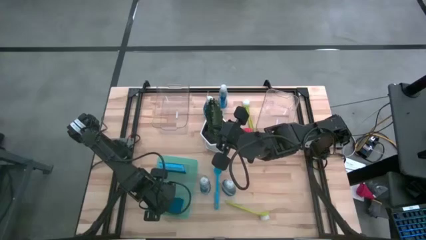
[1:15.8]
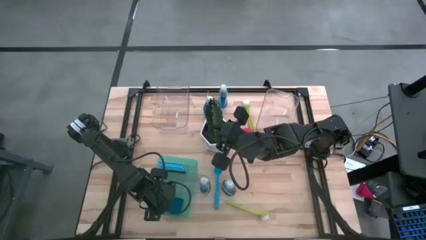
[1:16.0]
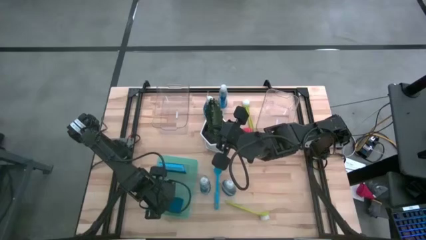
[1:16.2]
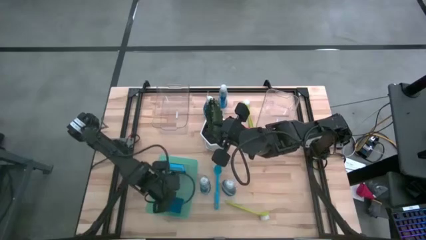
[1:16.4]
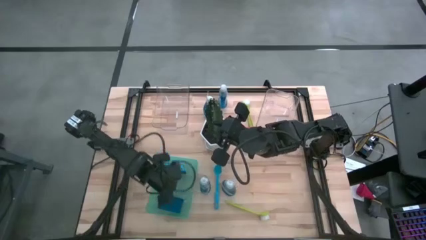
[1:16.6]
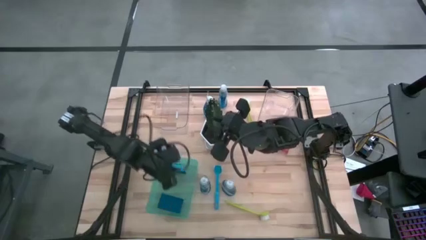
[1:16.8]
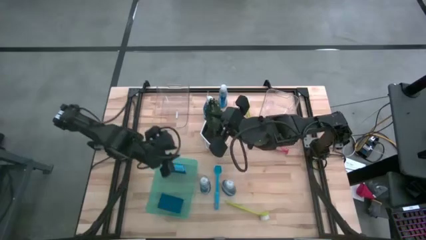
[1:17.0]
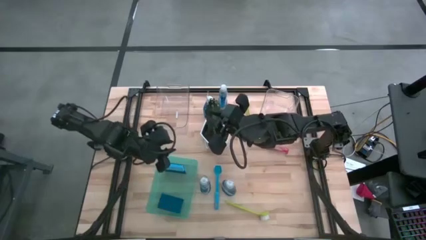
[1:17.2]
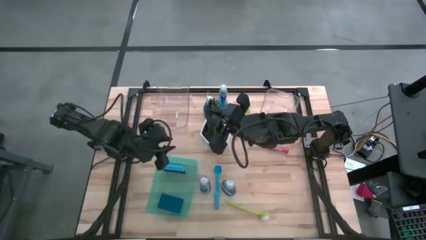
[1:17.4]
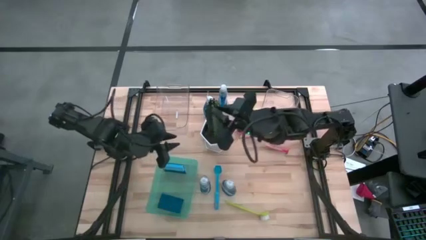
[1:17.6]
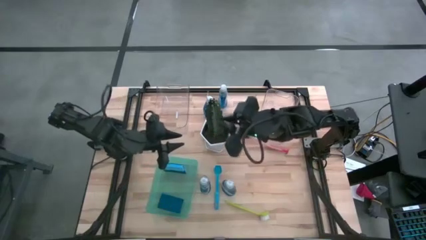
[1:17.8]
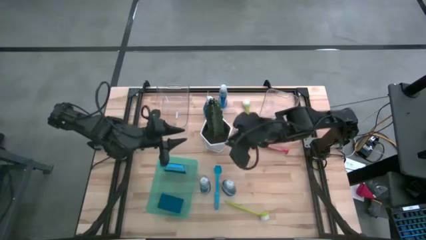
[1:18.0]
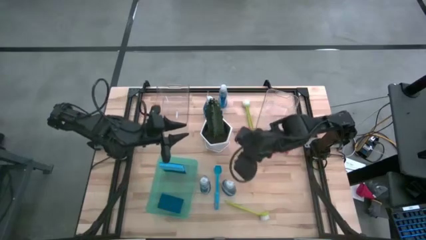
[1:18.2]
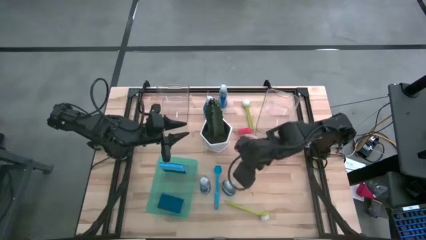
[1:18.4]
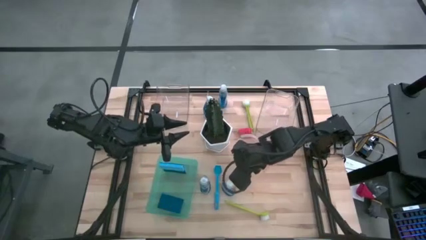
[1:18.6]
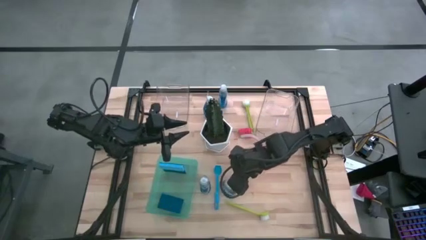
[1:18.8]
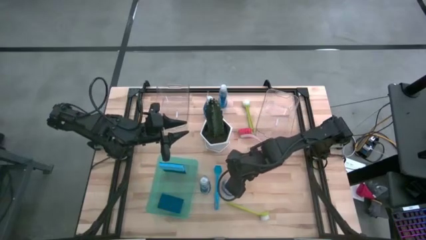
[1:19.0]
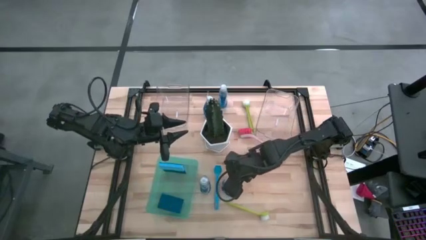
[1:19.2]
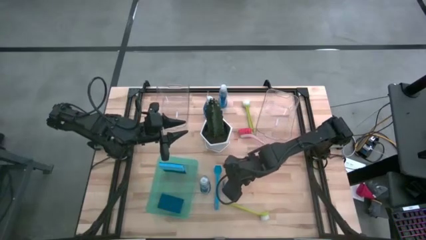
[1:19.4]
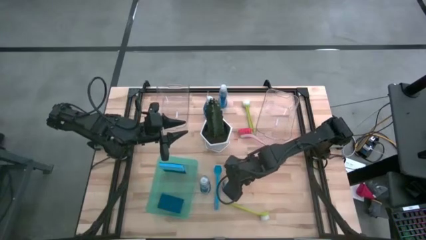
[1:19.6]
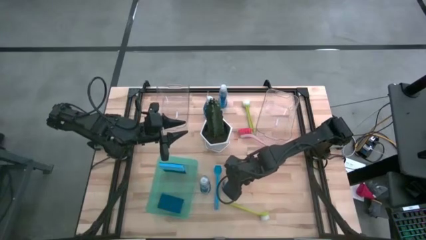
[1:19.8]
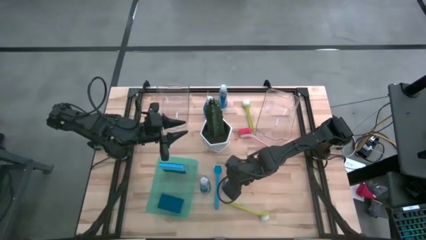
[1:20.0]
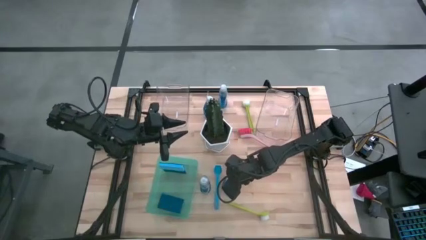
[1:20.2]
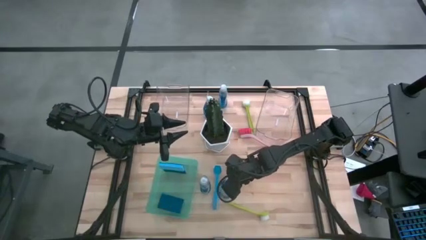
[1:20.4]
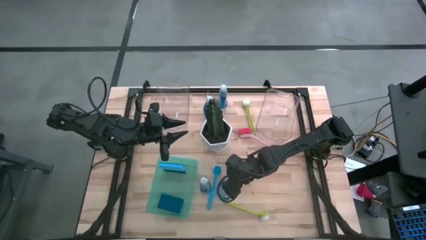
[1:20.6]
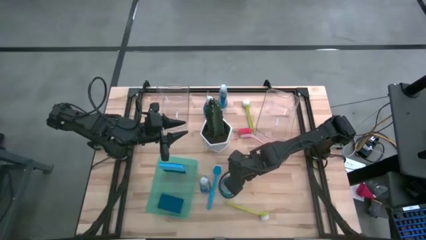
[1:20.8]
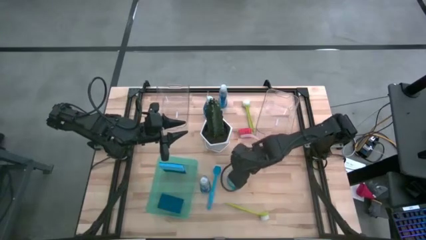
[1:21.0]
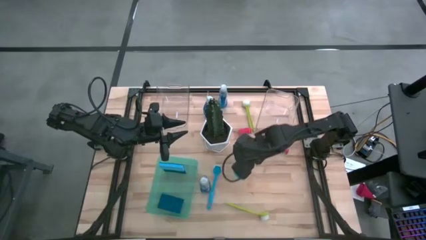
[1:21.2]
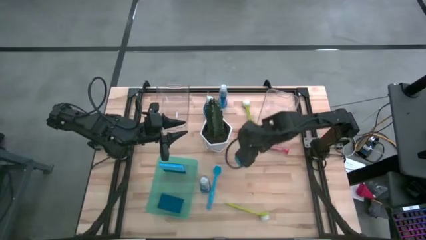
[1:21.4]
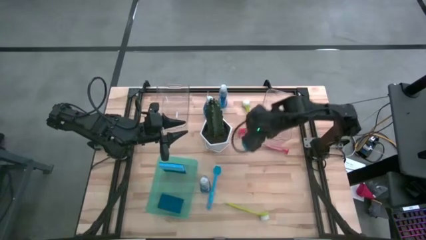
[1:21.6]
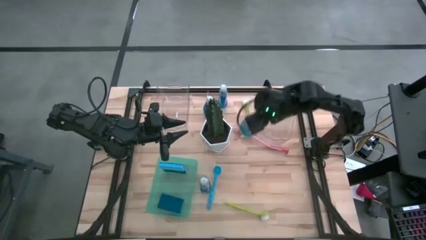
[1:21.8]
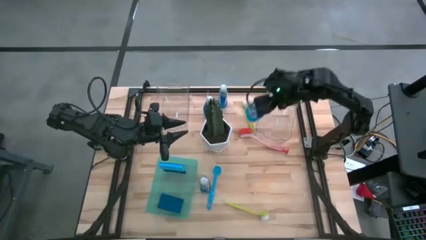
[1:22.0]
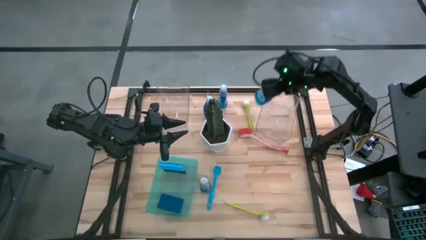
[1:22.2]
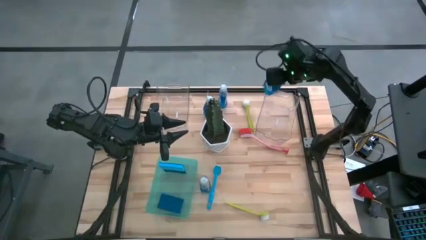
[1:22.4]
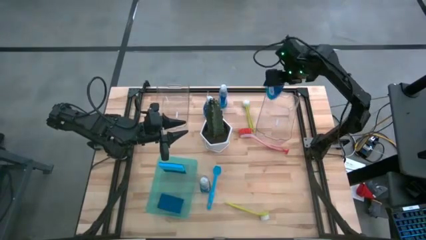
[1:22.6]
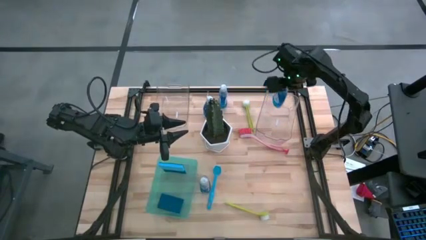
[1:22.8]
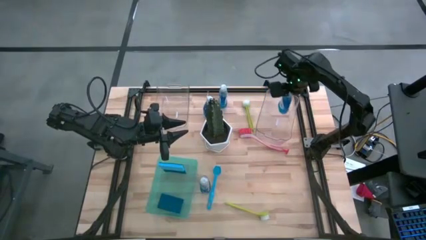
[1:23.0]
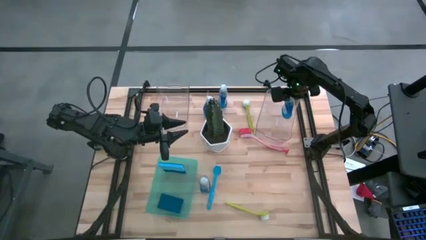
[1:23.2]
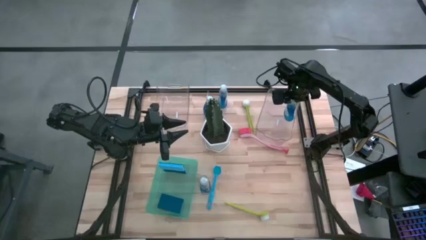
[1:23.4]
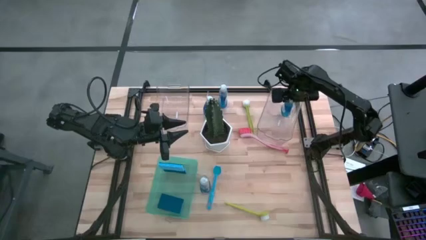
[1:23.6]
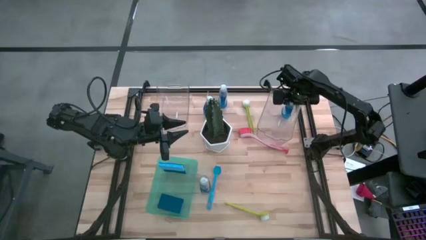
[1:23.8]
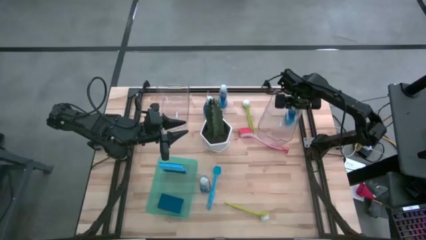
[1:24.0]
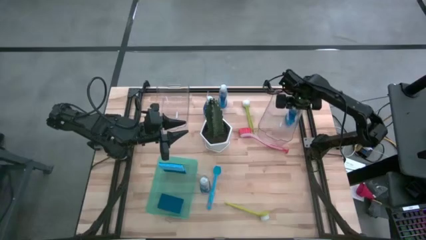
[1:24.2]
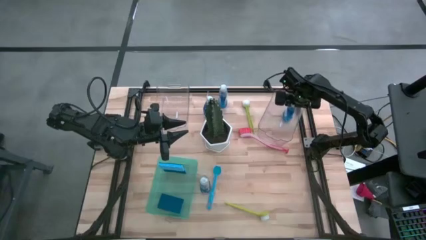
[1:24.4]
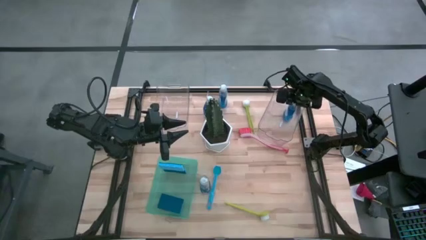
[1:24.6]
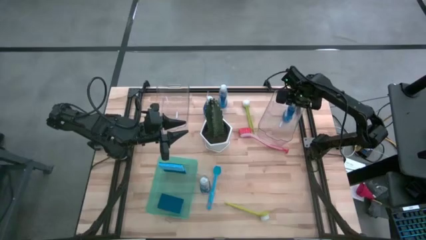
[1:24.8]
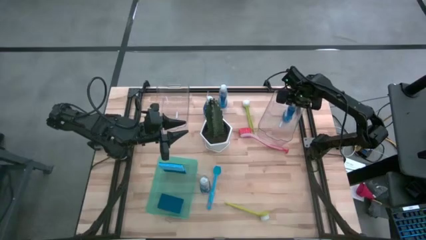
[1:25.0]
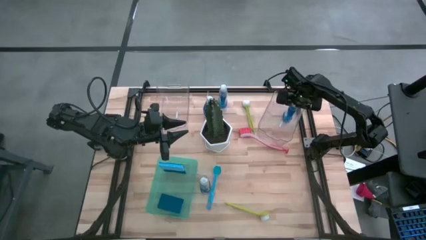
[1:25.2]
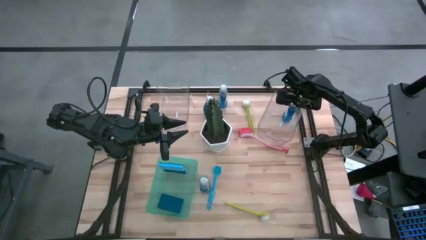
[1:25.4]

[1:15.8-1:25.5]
Task: Pick & Place Kitchen Sink Supplies
Put the blue dishwashing liquid bottle into the right transparent bin

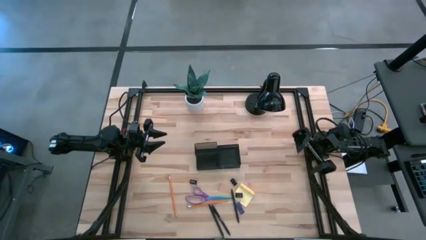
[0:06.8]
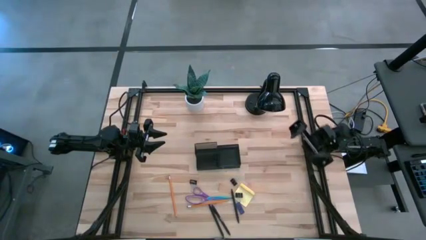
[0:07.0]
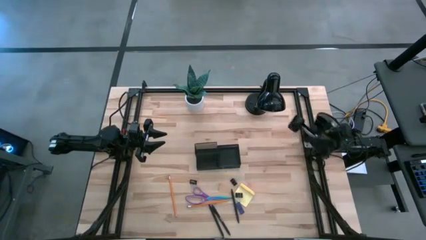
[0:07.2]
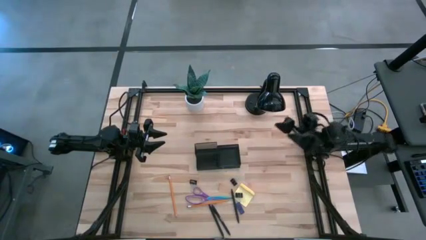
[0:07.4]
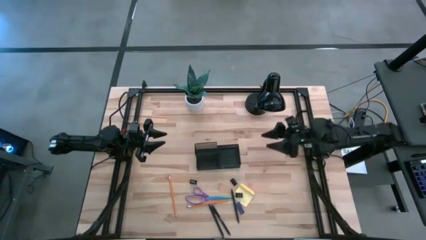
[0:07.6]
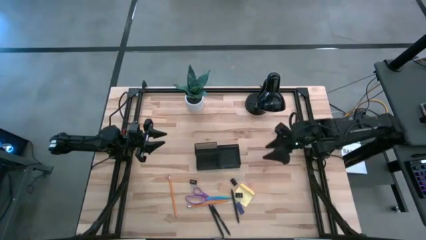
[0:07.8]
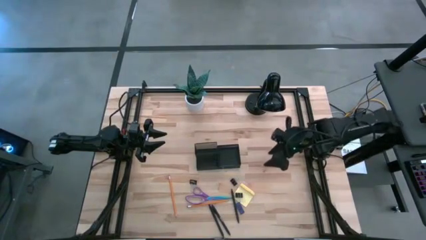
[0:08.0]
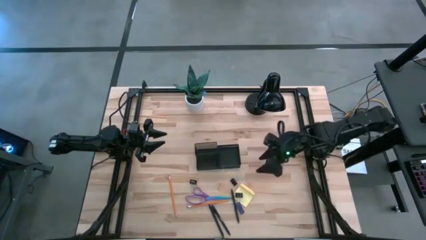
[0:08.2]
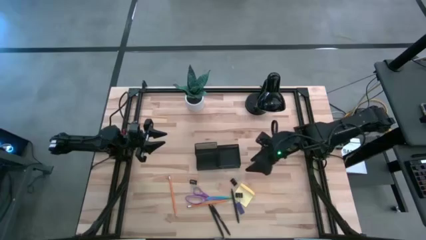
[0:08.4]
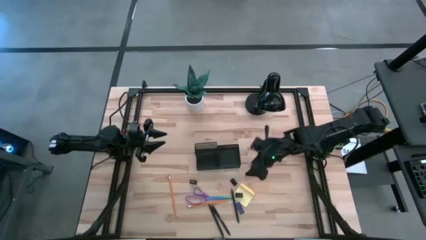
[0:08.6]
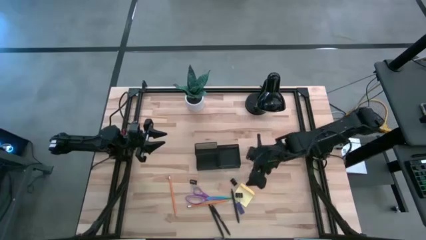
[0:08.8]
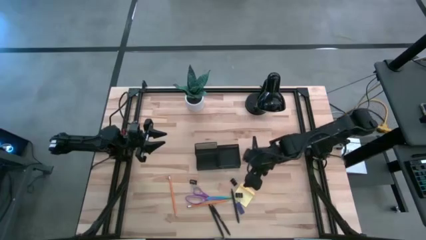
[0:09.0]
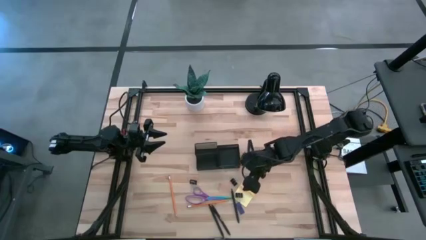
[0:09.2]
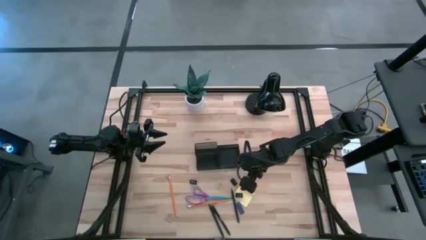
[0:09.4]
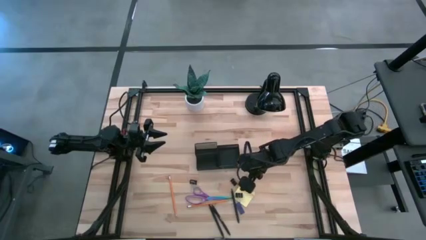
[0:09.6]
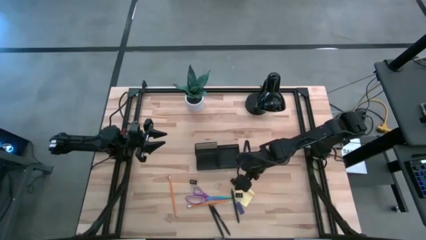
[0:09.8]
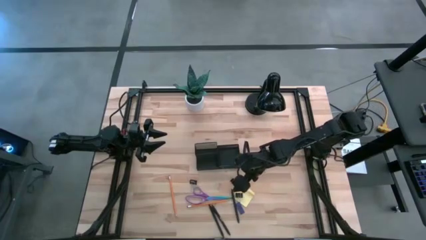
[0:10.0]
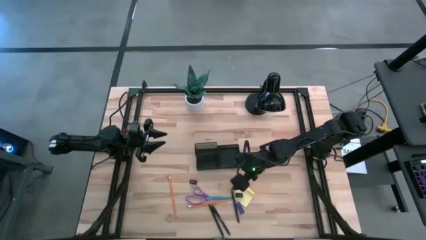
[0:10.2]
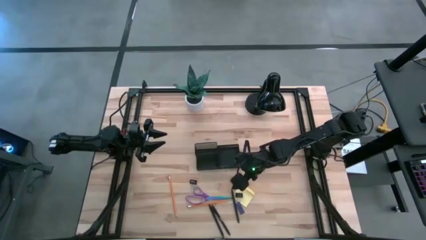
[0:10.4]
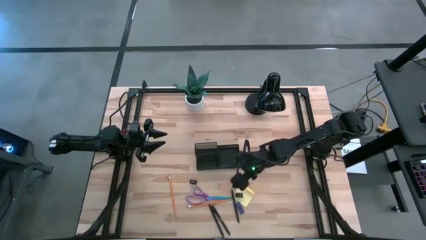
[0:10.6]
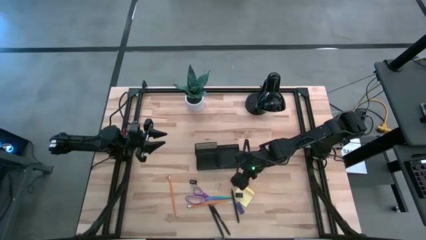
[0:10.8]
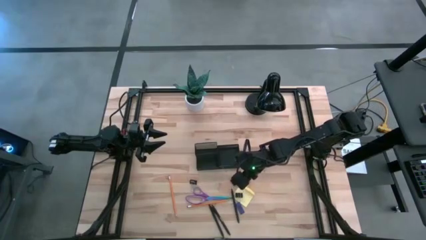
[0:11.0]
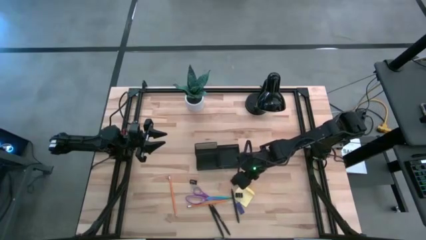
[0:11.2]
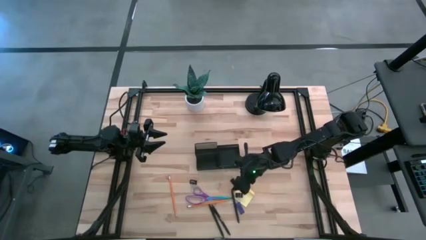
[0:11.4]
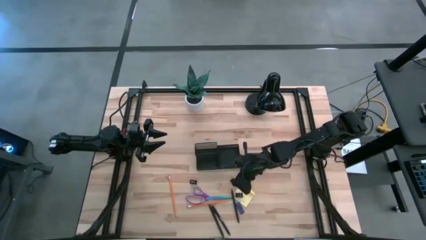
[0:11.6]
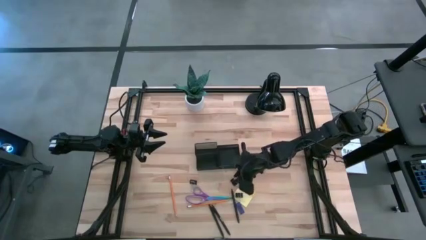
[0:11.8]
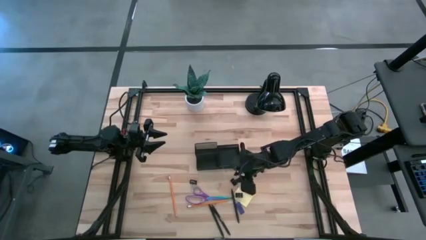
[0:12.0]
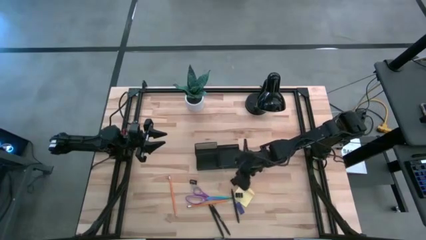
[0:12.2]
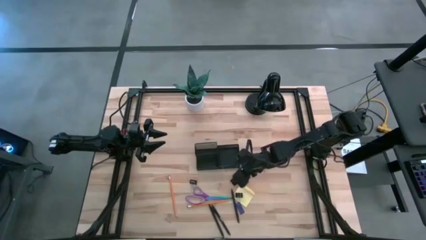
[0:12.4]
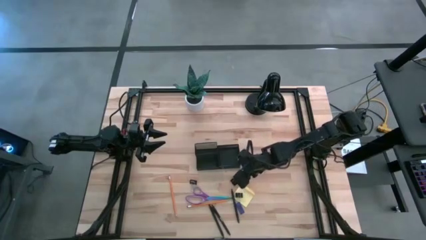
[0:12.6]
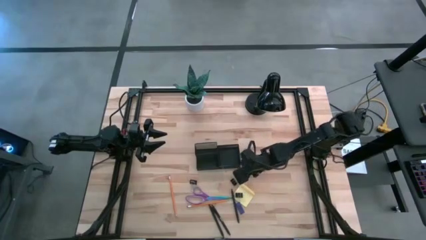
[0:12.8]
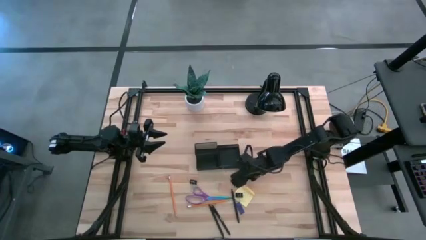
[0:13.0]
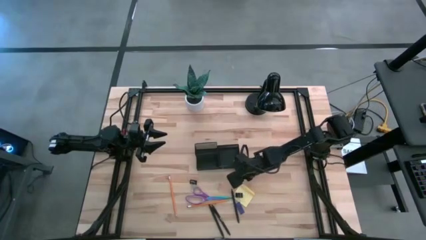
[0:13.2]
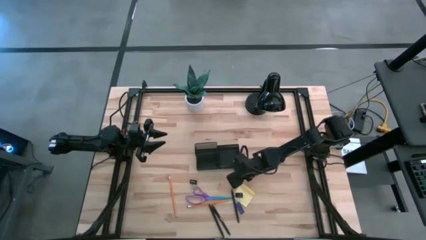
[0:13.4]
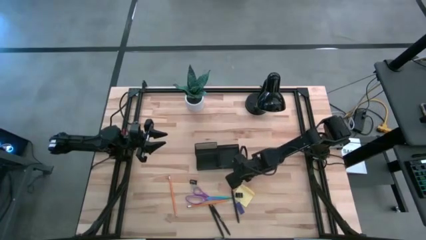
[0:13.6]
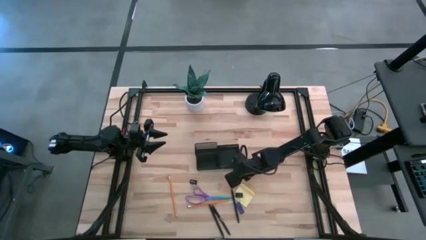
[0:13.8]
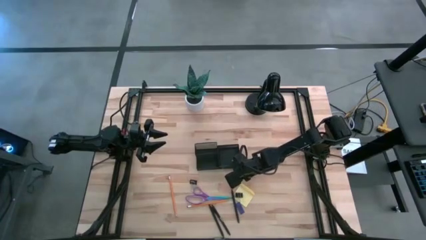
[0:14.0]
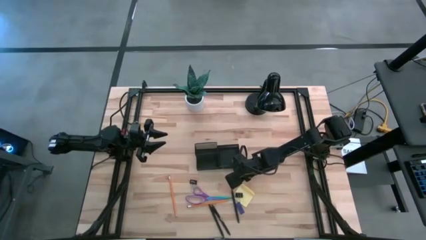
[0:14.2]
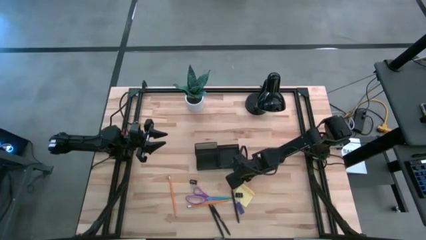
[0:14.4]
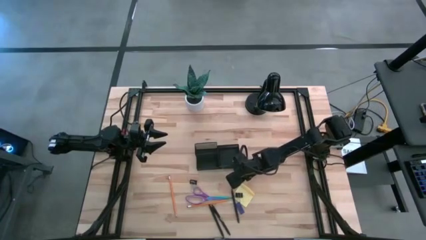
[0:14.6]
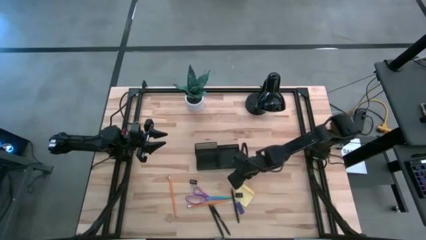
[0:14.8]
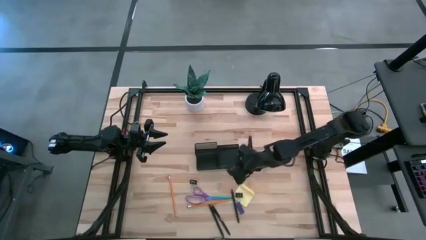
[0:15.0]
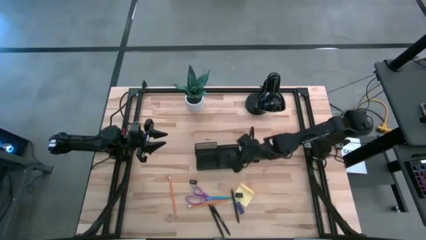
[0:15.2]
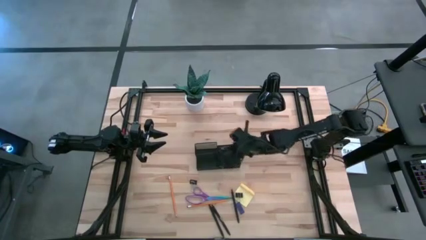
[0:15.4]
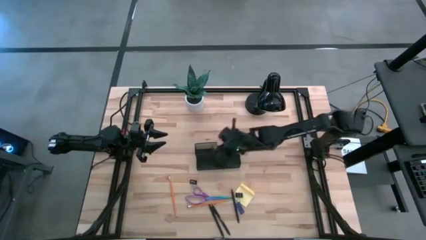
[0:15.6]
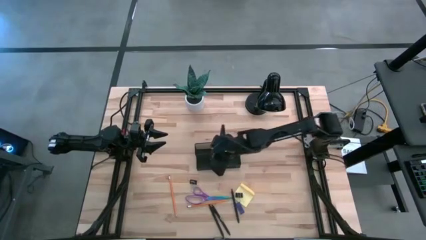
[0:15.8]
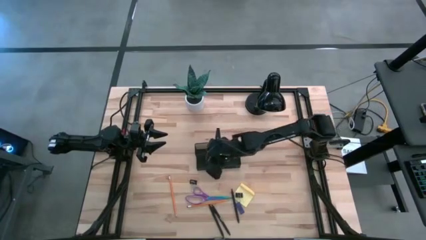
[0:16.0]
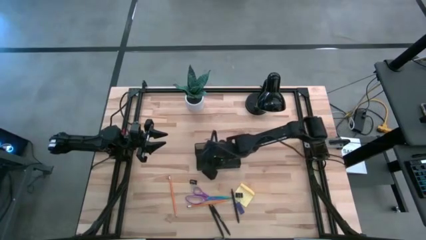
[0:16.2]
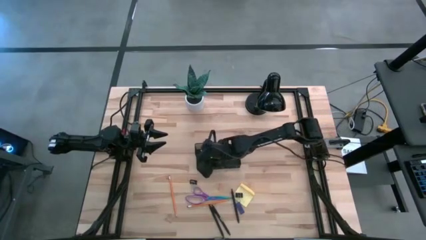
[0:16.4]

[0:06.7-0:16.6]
Task: Pick and place office supplies into organizer
Put the middle binder clip into the desk organizer
